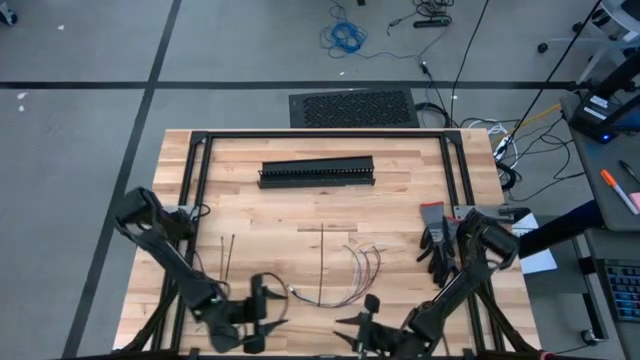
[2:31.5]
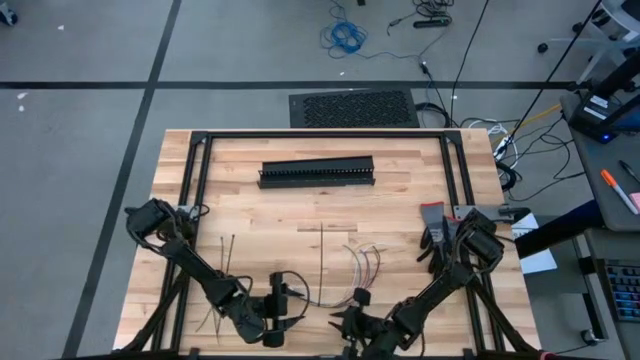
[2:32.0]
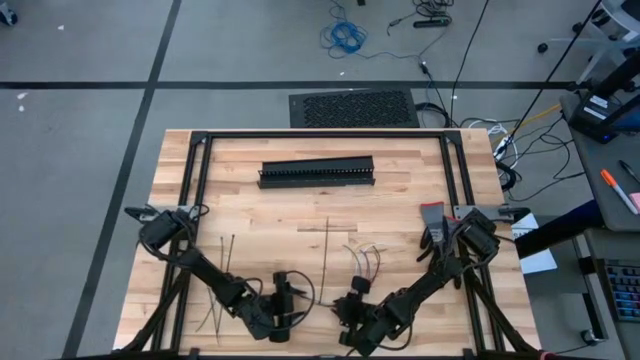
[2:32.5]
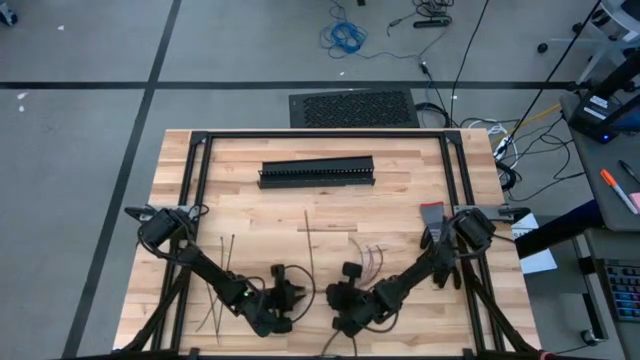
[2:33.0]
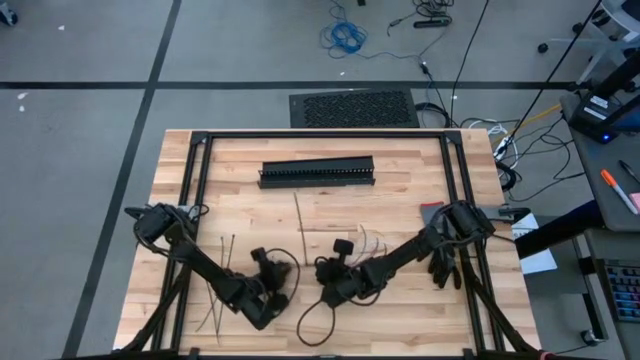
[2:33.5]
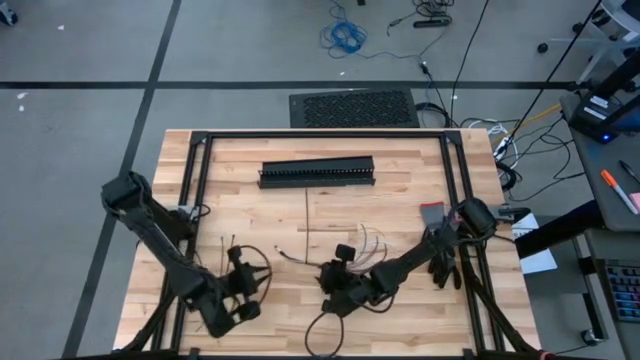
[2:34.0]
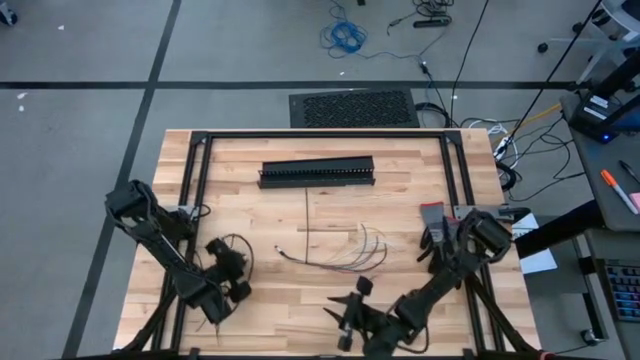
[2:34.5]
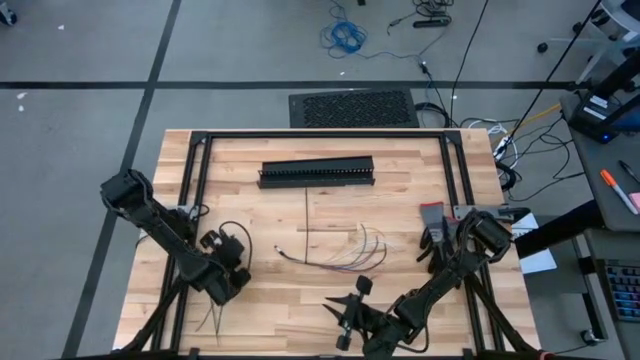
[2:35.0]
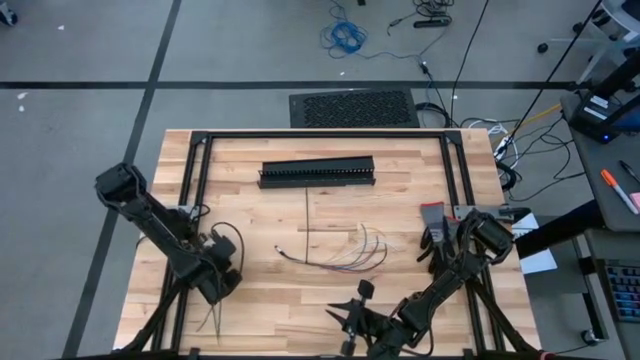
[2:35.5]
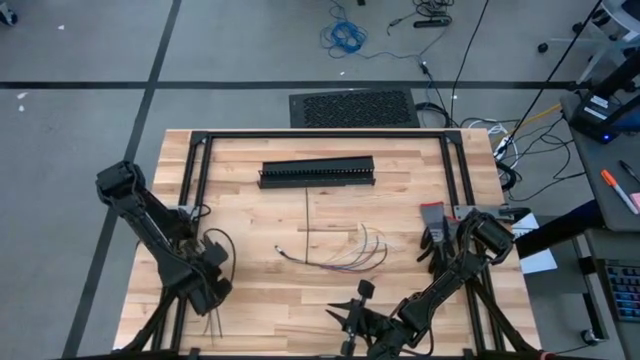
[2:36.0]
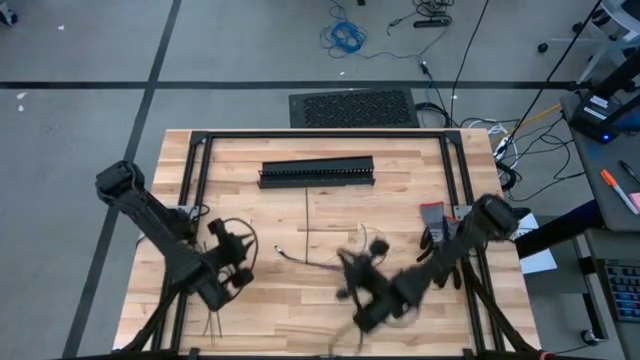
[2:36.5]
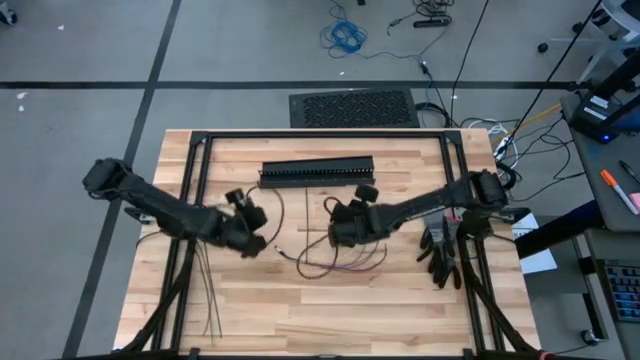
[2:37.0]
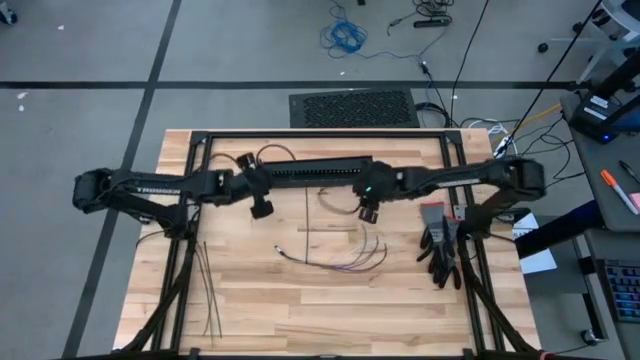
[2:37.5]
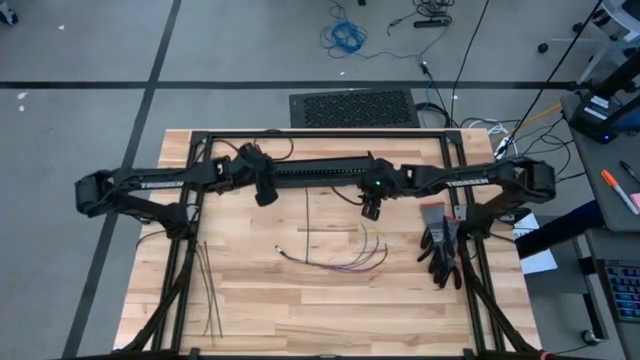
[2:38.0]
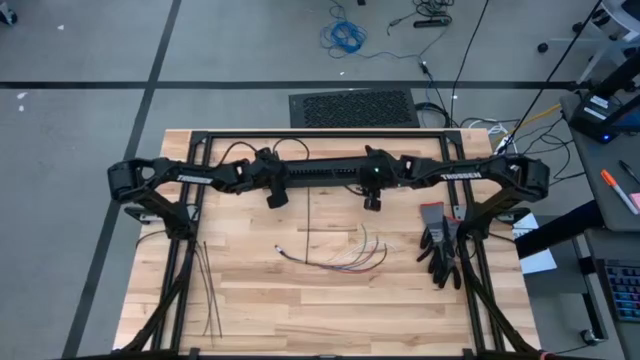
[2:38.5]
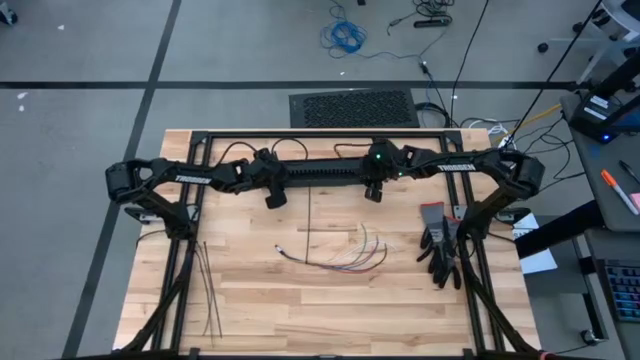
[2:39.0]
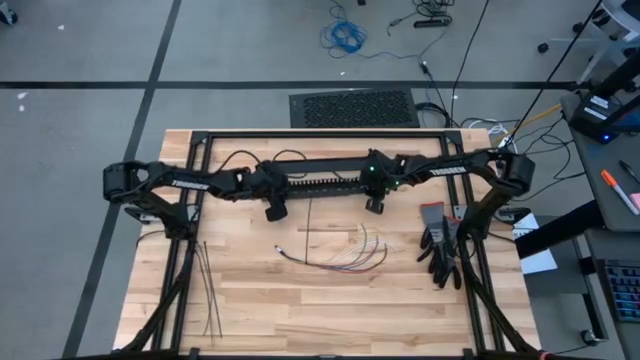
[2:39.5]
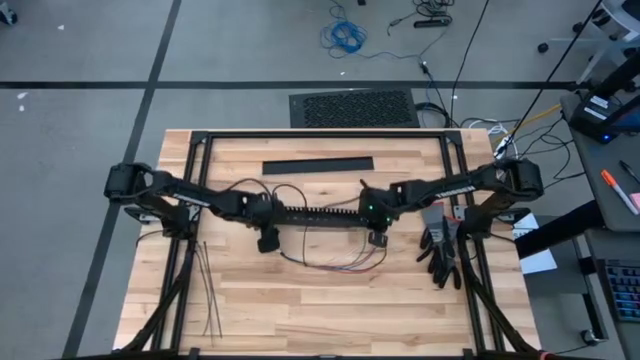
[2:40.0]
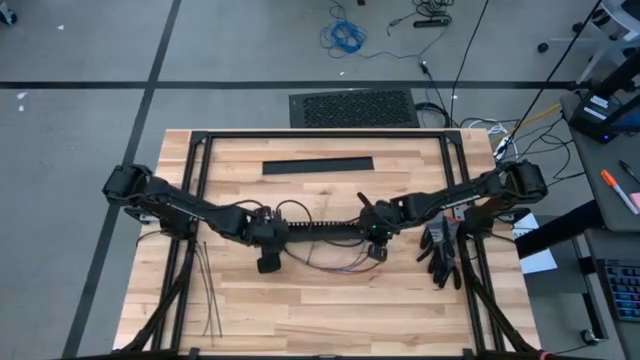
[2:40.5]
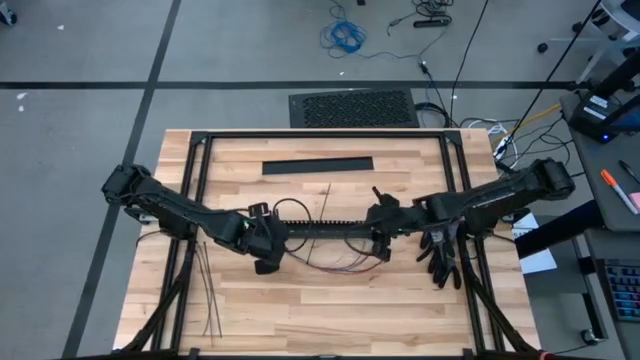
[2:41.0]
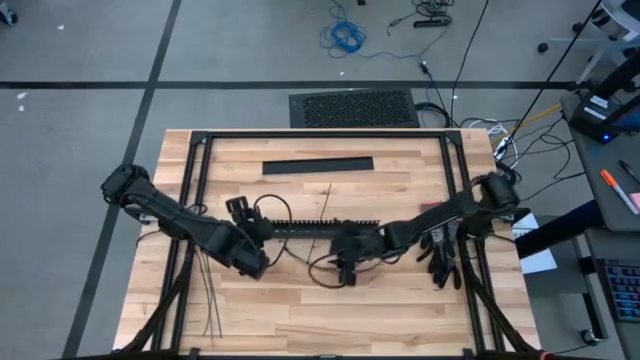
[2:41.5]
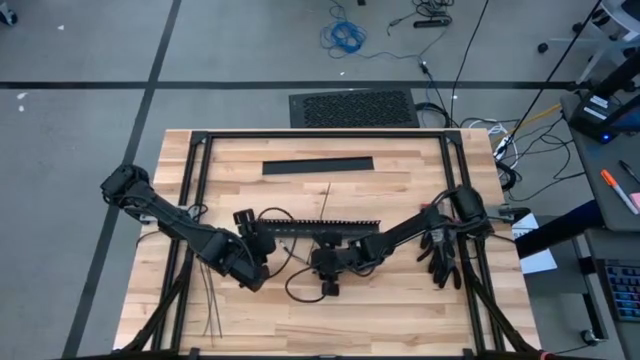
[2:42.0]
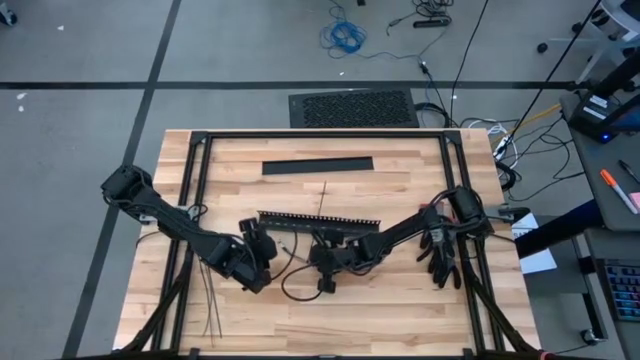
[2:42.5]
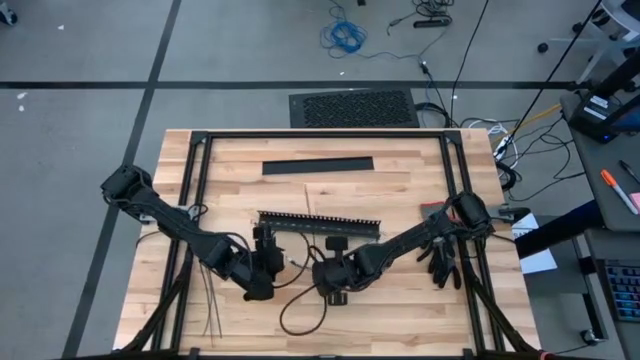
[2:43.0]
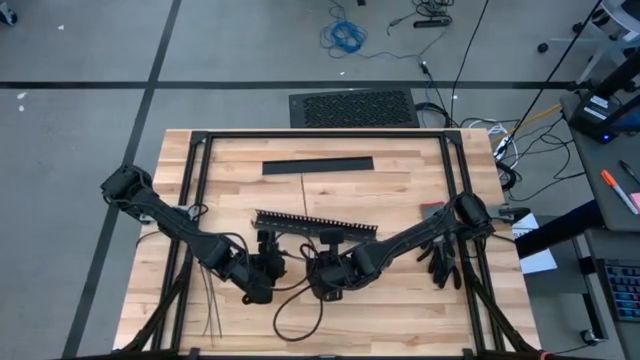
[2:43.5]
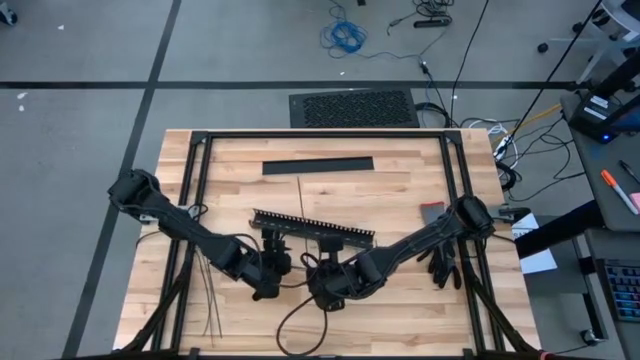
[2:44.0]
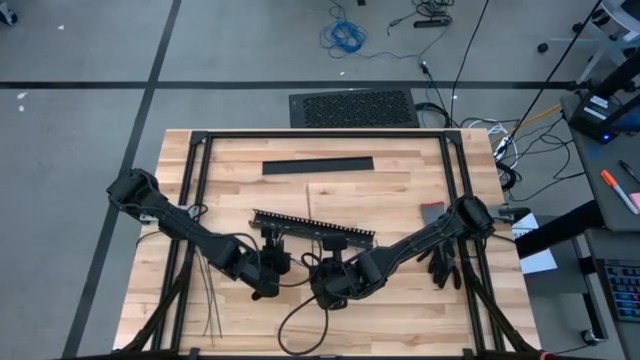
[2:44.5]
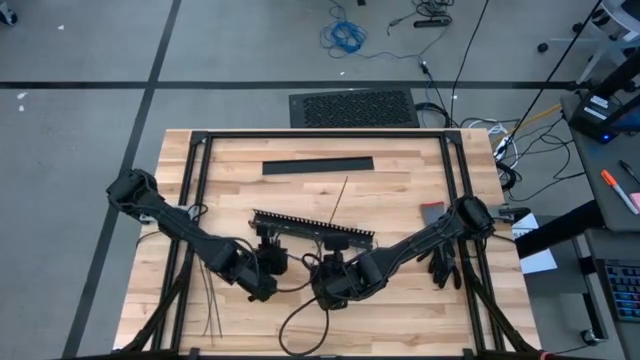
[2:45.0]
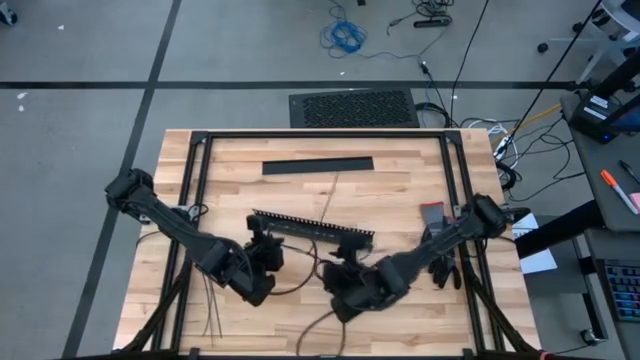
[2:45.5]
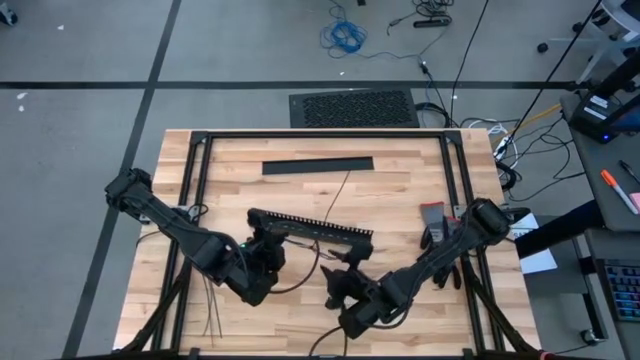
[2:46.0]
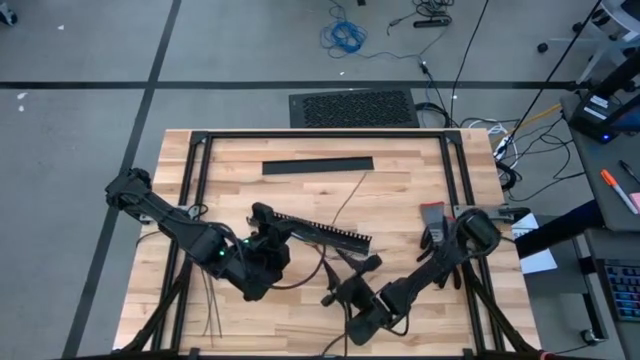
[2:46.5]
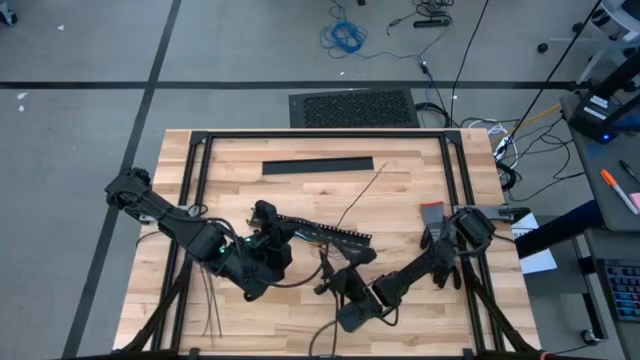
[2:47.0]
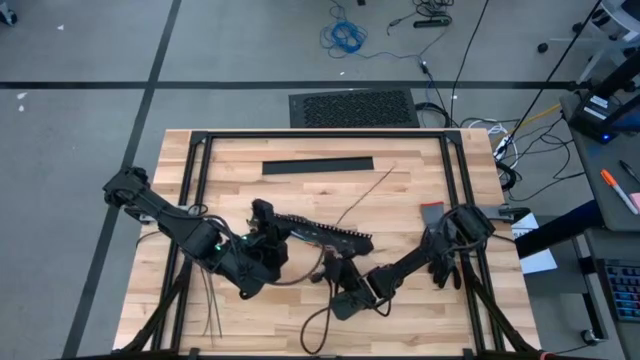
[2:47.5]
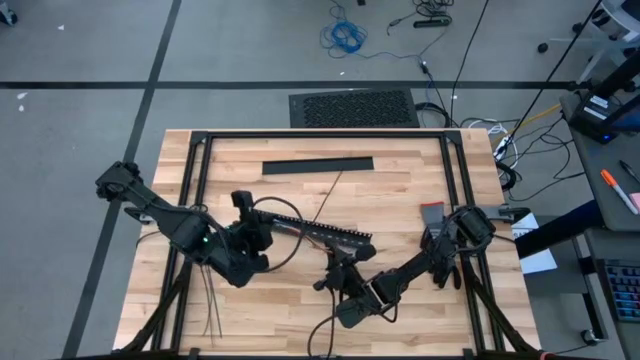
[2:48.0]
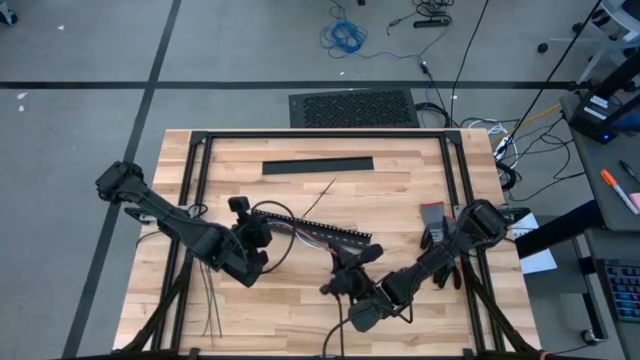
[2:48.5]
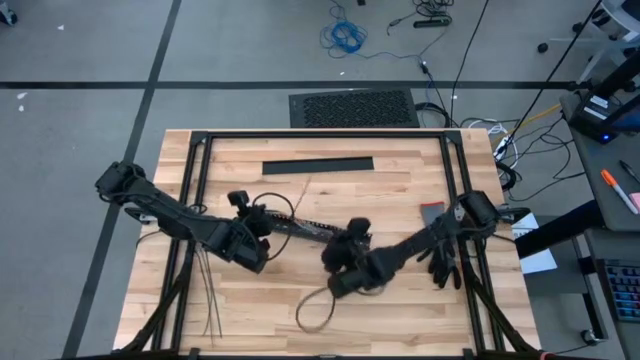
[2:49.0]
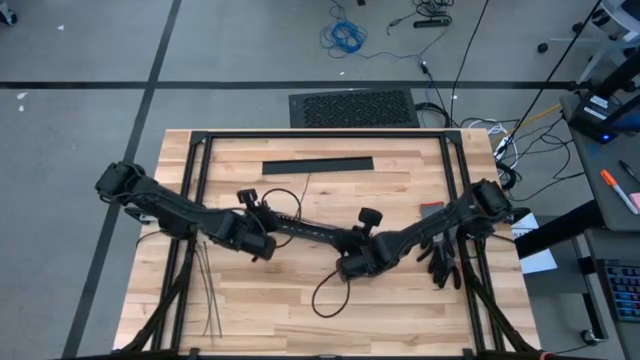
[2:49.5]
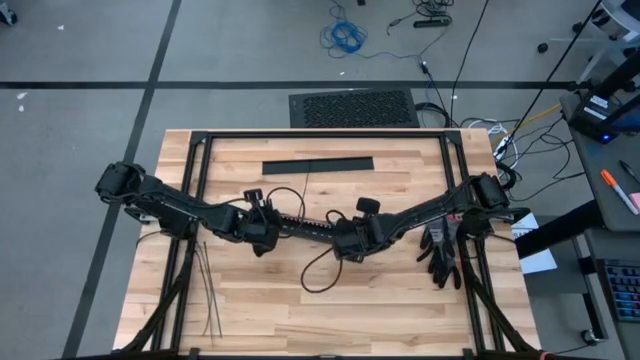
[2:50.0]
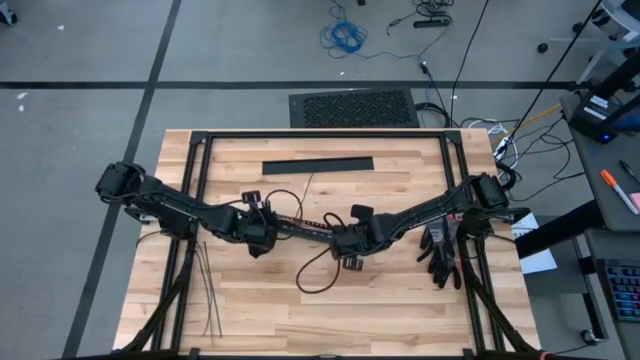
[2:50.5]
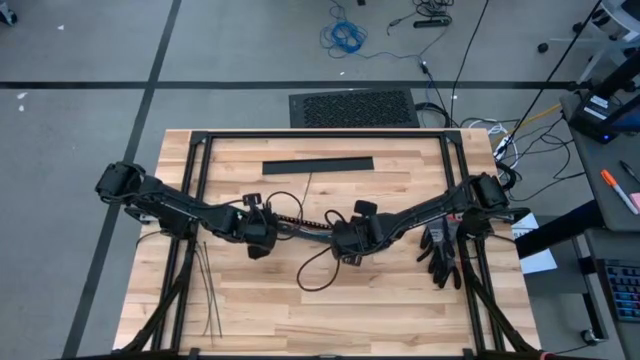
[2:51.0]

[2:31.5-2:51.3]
Task: Ziptie cables
Put the zip-tied cable into the black cable duct
